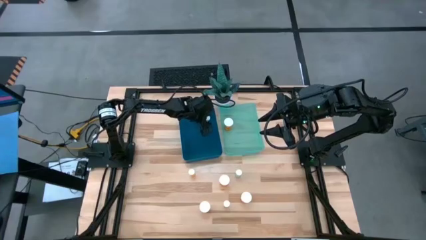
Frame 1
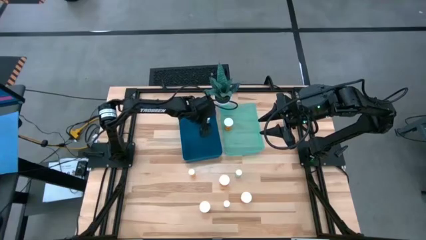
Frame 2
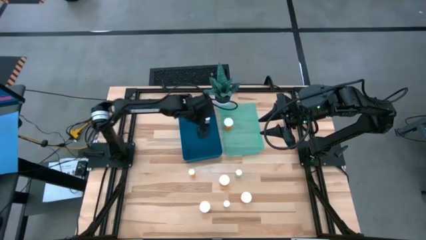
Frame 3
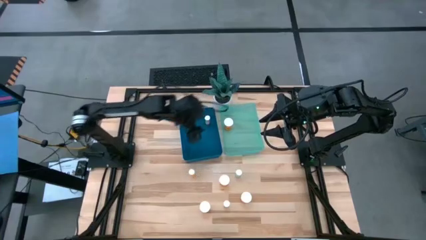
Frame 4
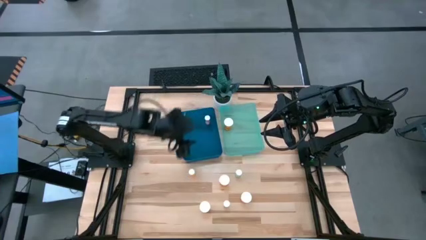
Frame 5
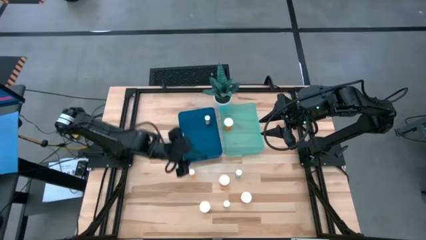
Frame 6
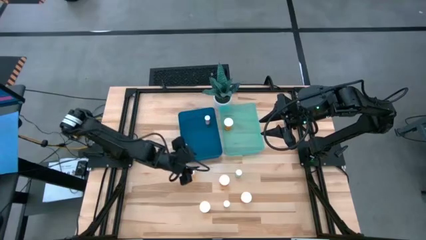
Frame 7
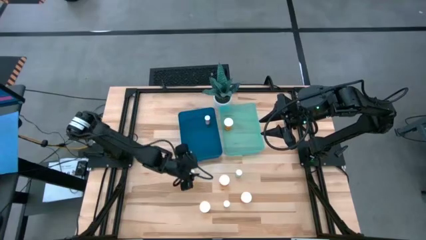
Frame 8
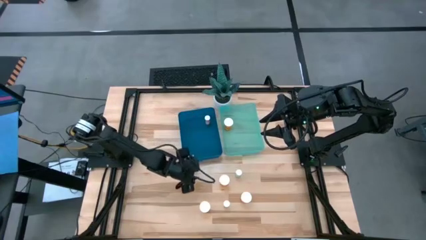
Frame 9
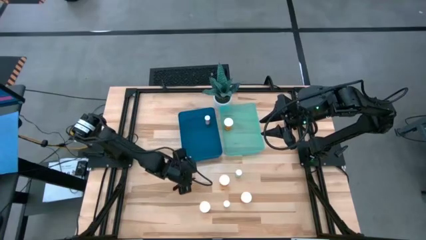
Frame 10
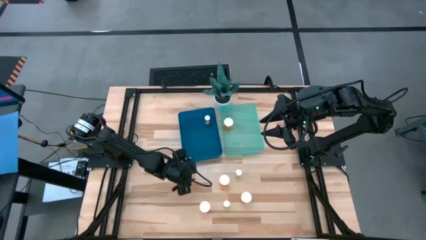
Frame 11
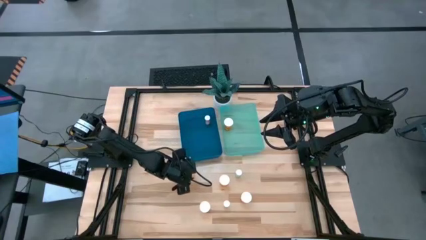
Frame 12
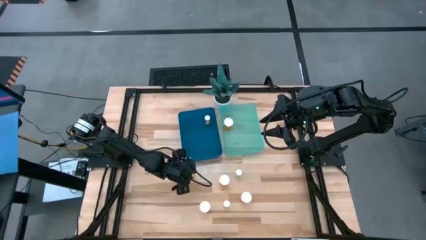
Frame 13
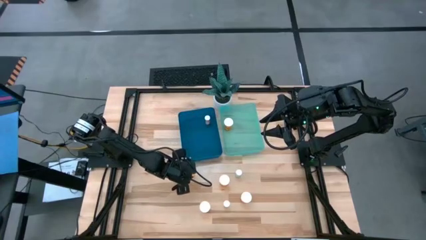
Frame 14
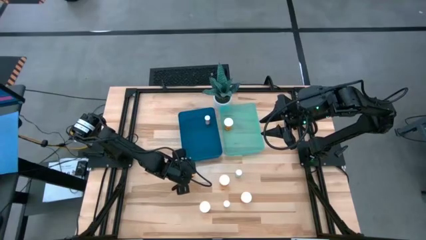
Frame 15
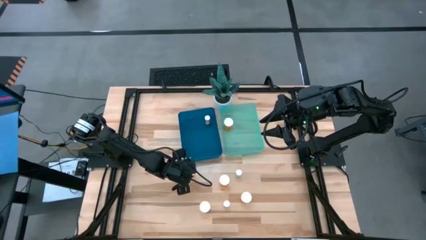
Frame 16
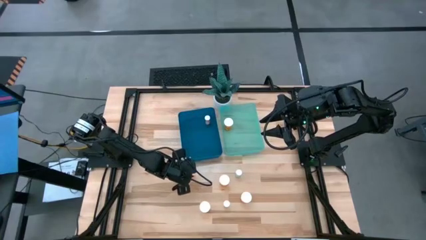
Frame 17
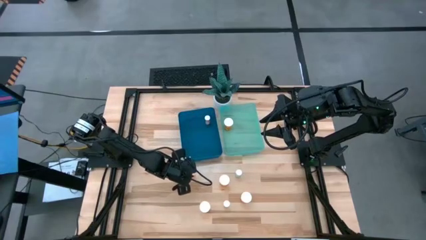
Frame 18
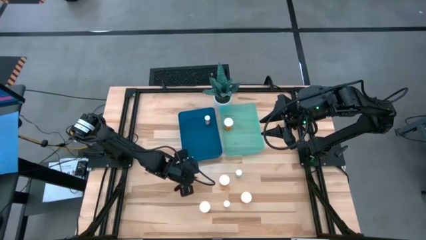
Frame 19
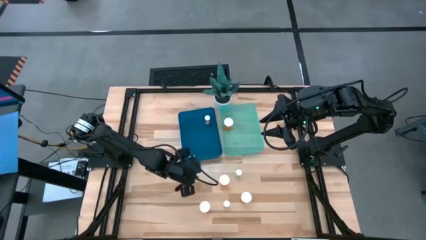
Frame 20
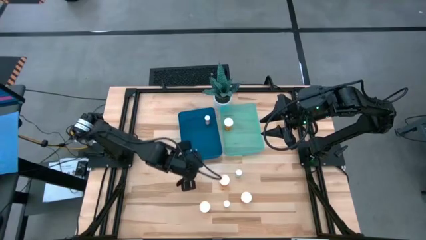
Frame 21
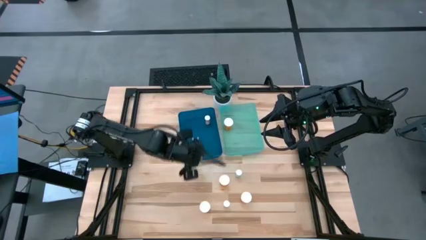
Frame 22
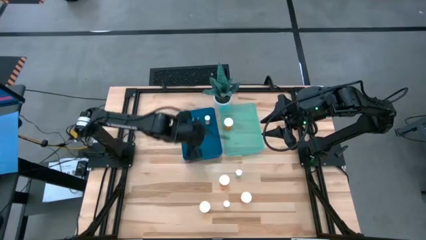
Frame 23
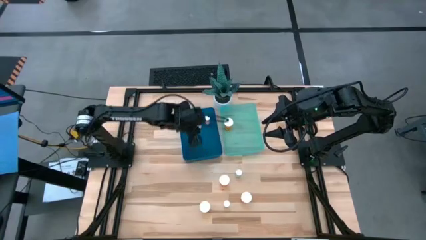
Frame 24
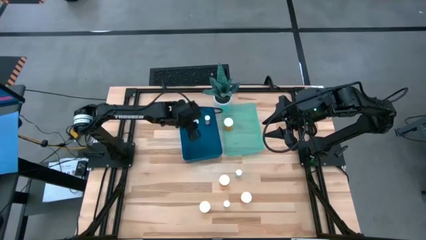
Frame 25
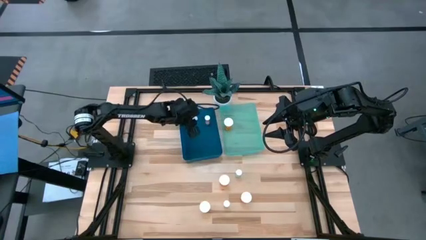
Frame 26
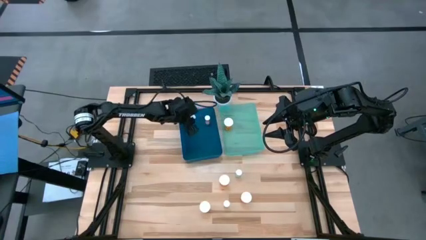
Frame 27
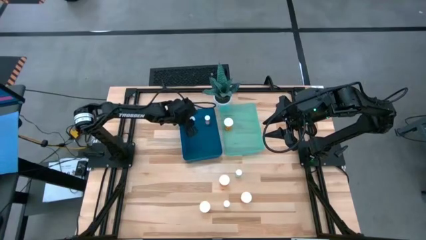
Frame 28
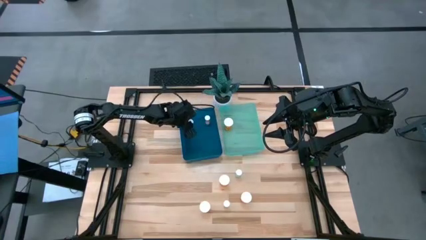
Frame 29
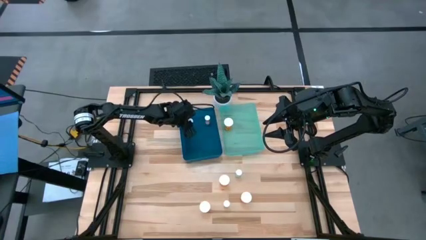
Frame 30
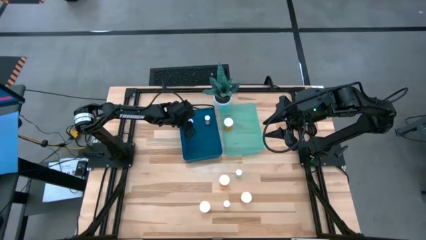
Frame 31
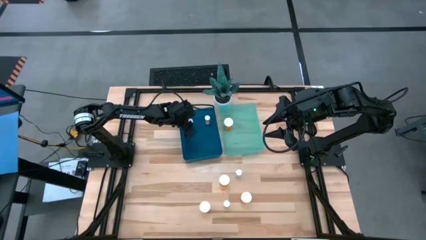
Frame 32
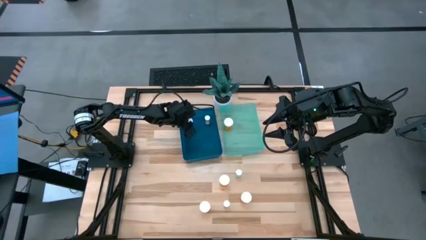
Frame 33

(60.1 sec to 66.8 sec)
Task: Pick and place medicine bottles into bin by pill shape (circle, oval)
Put the small orange tablet bottle into the blue bin

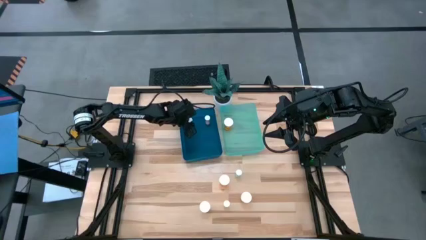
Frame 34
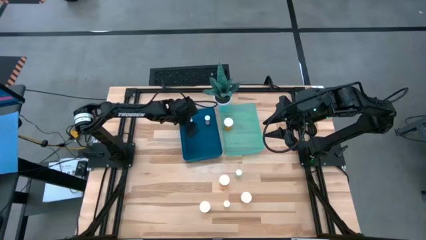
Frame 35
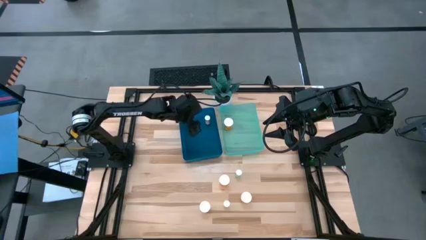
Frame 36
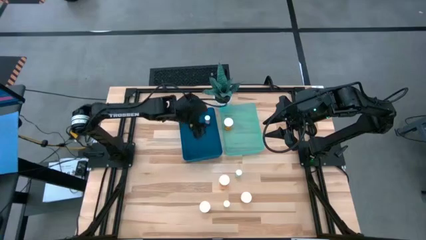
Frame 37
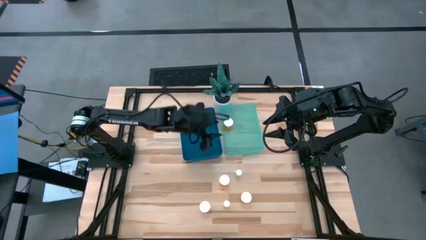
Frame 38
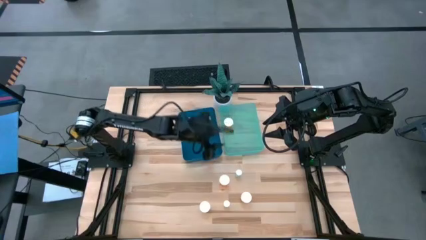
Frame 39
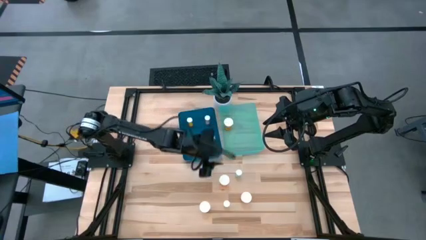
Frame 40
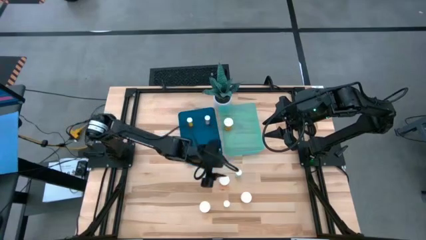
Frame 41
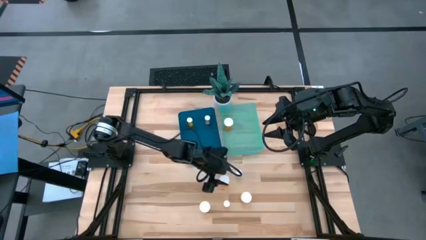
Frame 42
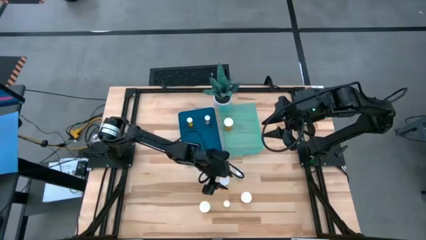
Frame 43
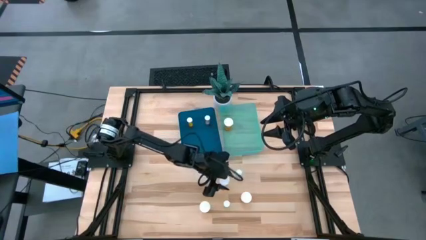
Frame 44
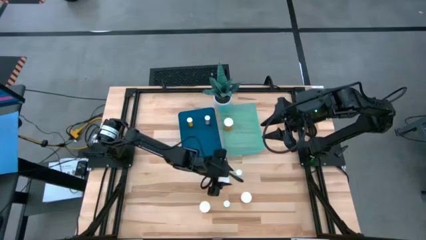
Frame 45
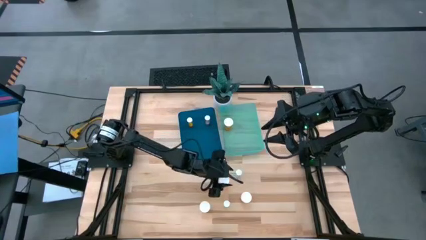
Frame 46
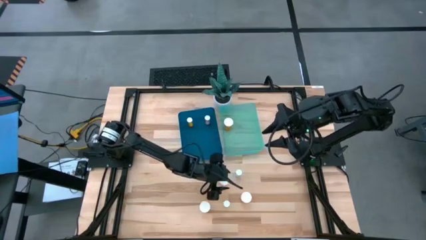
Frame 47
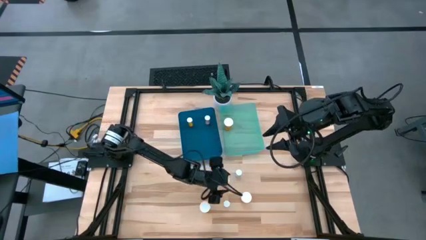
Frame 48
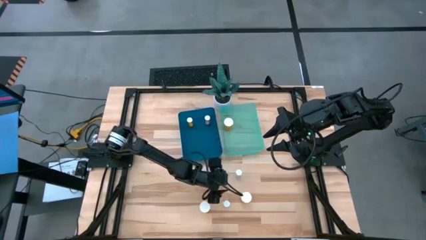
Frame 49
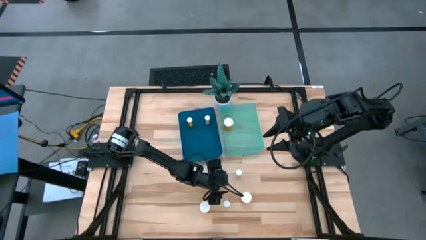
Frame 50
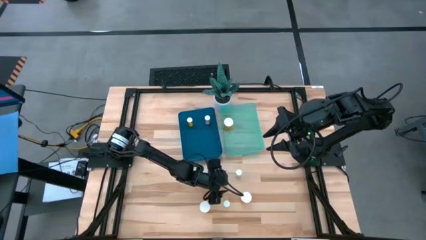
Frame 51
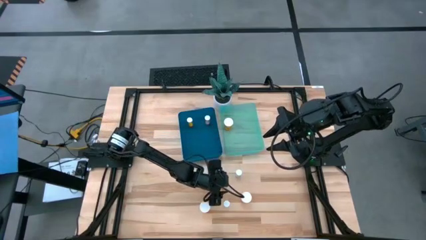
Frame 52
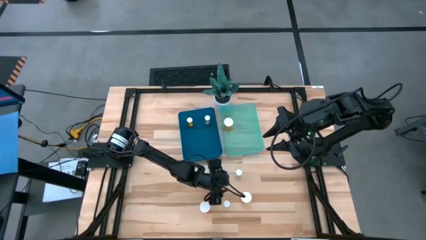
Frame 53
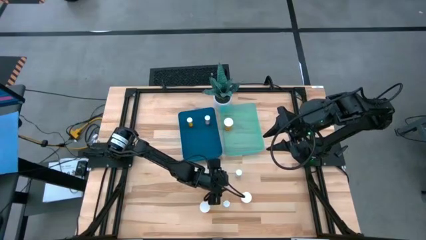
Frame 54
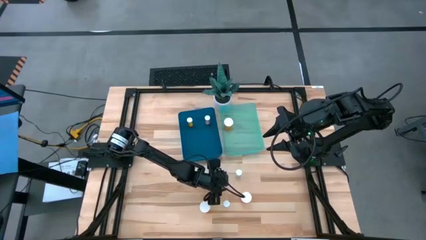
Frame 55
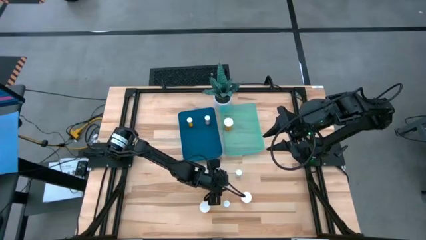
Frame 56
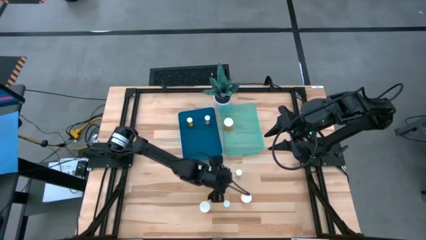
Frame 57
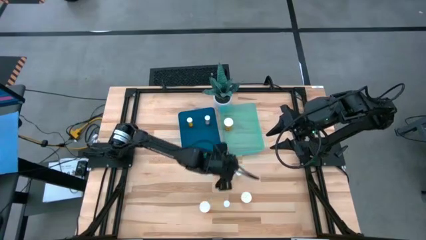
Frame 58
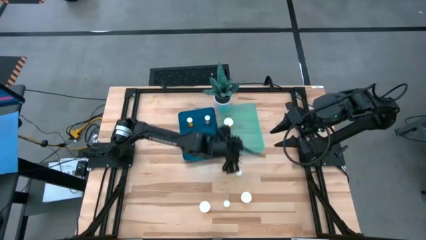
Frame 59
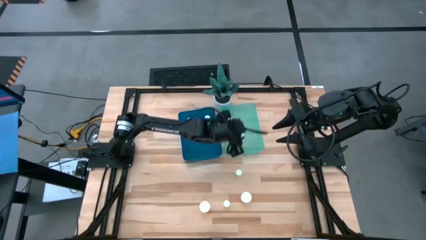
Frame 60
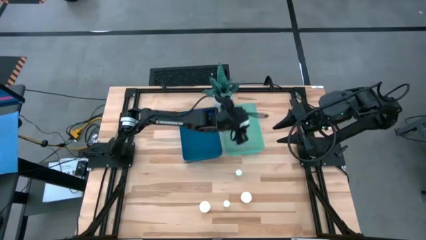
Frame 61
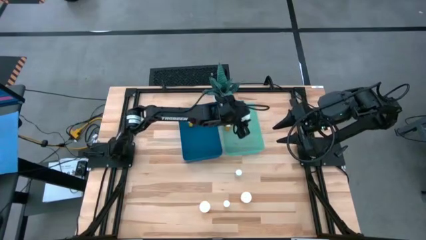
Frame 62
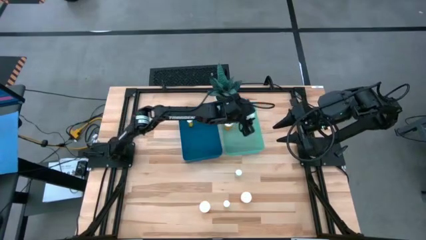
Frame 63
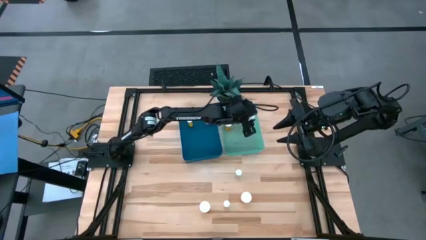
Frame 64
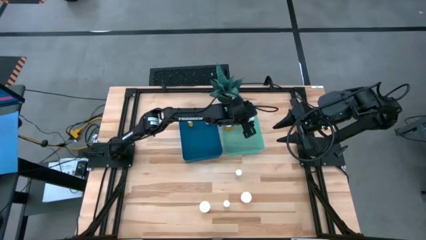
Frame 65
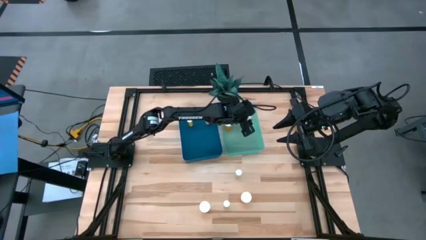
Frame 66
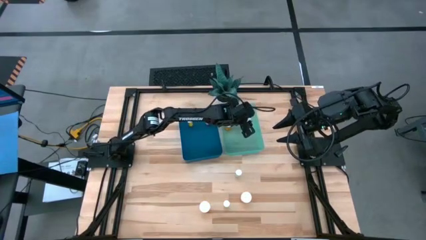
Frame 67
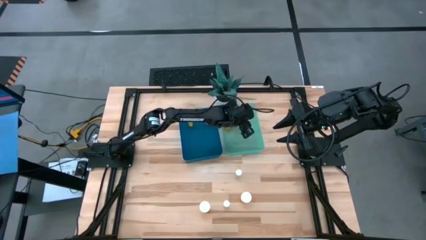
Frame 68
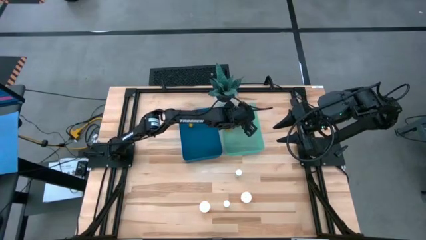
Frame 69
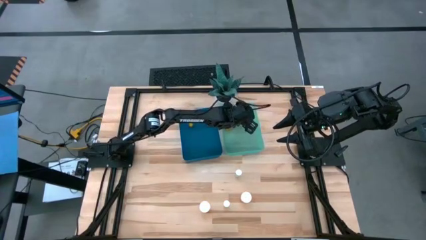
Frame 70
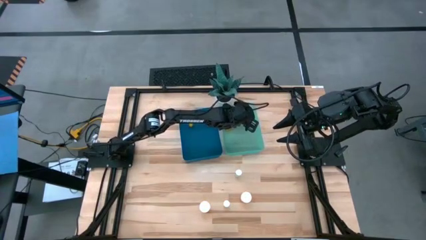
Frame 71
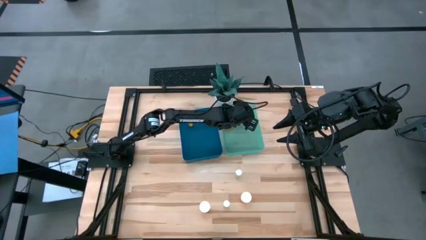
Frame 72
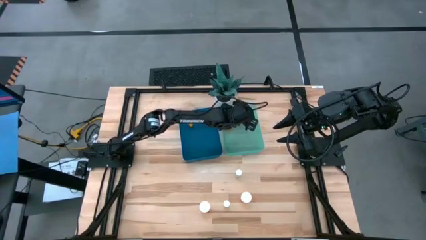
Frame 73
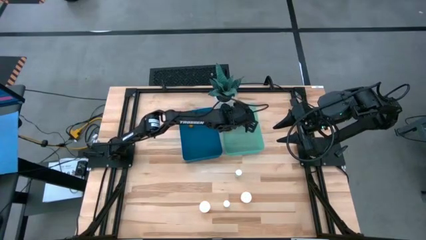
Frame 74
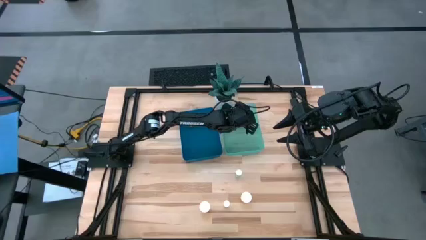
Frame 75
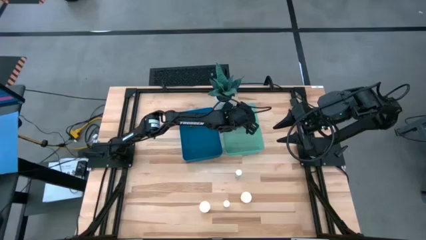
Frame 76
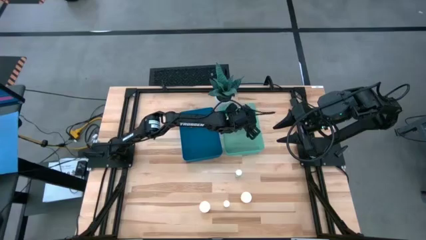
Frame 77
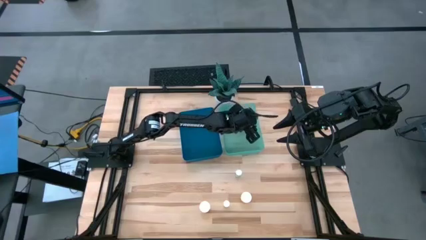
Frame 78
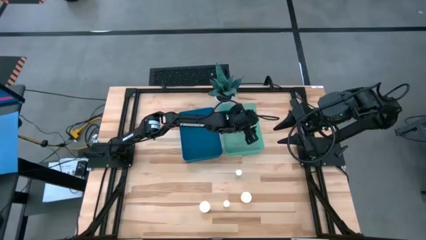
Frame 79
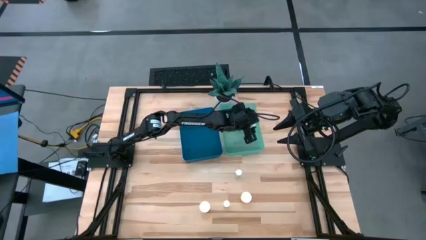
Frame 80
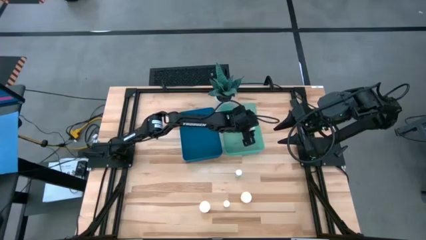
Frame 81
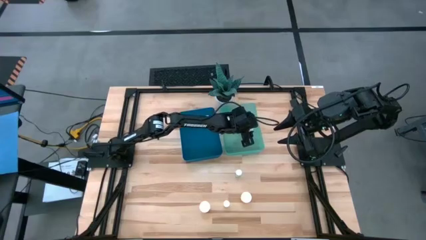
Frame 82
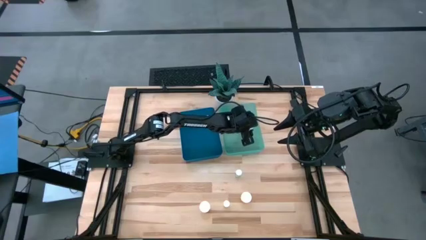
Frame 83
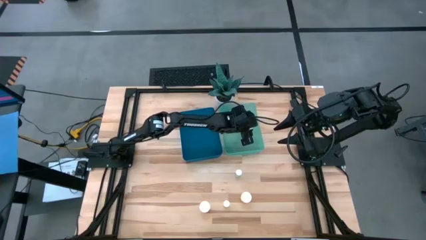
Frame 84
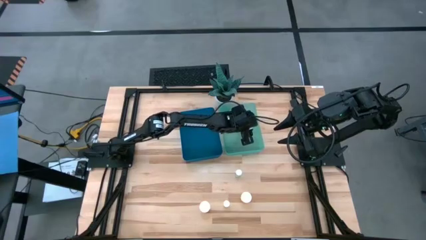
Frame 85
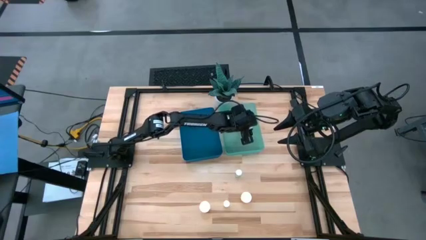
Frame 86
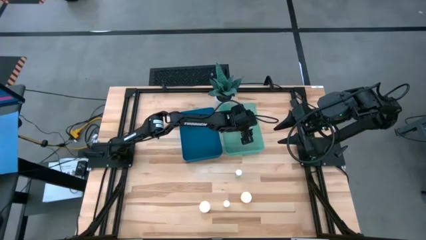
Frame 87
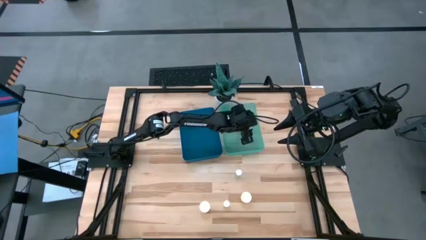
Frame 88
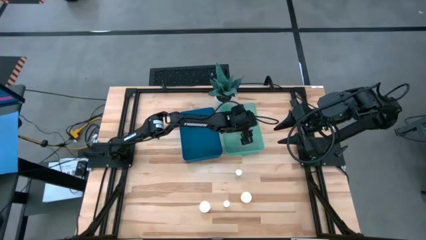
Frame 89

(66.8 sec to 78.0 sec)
Put the large orange capsule bottle into the green bin
